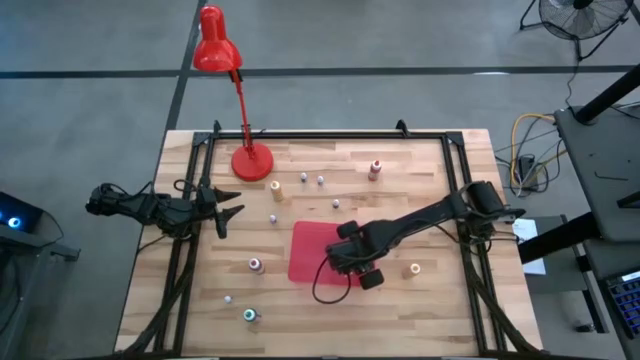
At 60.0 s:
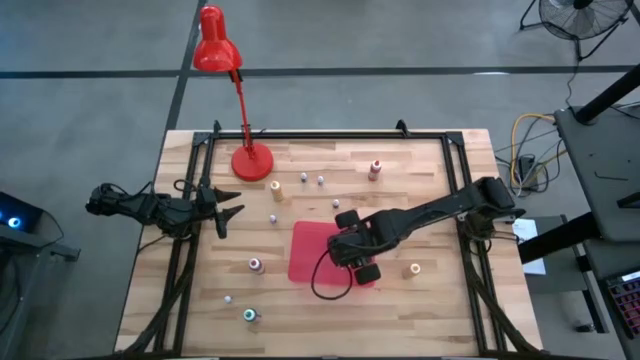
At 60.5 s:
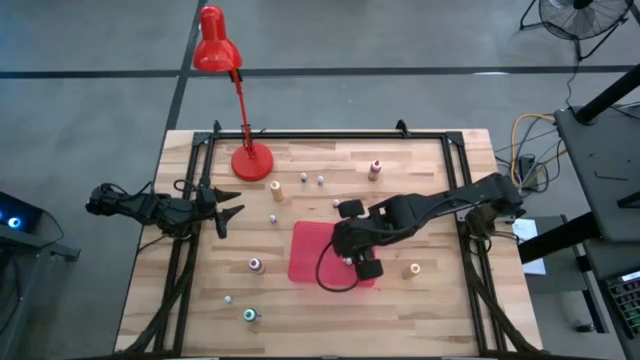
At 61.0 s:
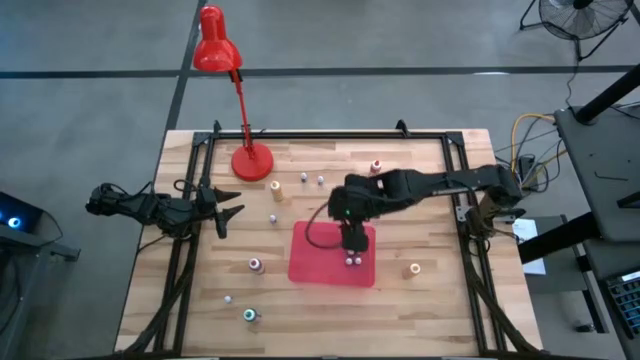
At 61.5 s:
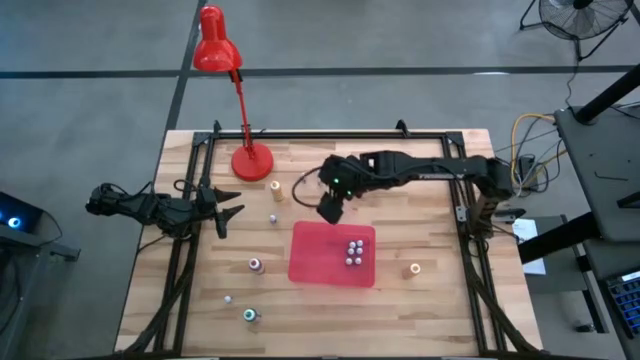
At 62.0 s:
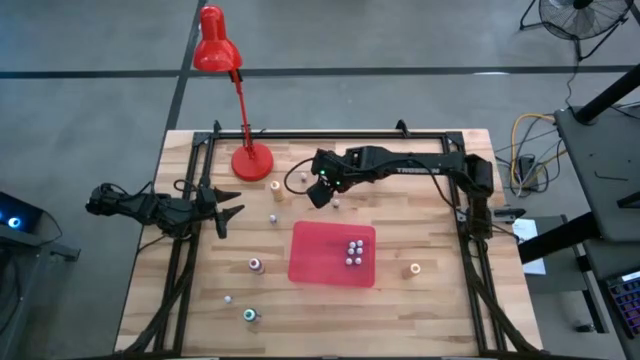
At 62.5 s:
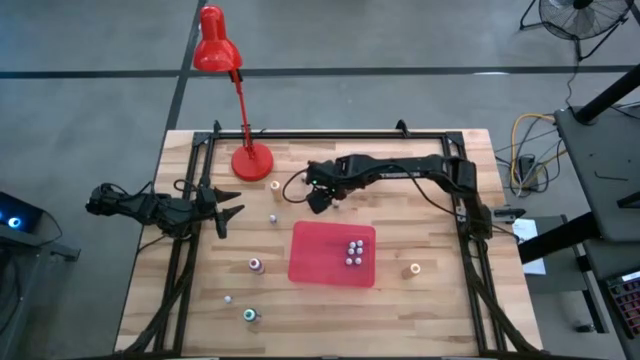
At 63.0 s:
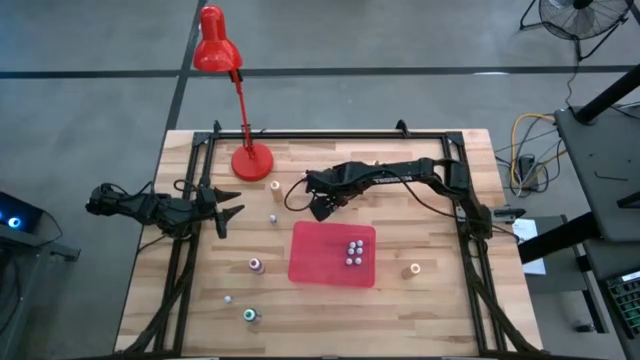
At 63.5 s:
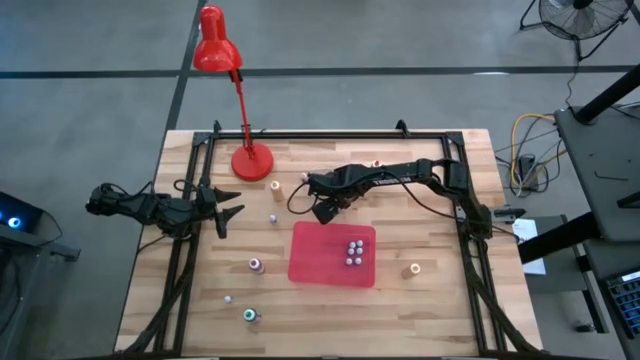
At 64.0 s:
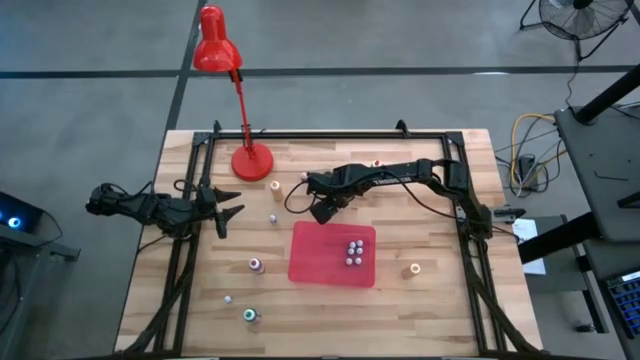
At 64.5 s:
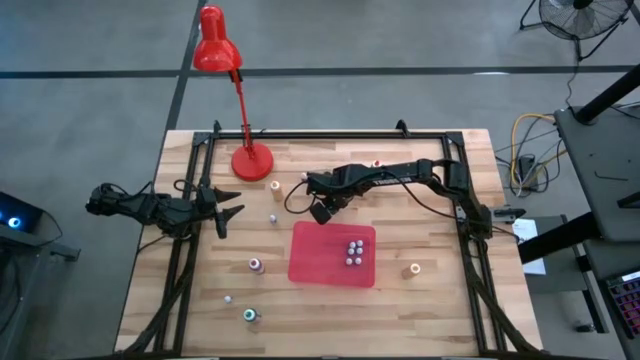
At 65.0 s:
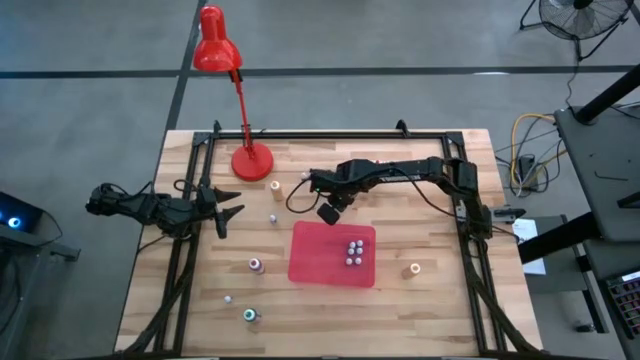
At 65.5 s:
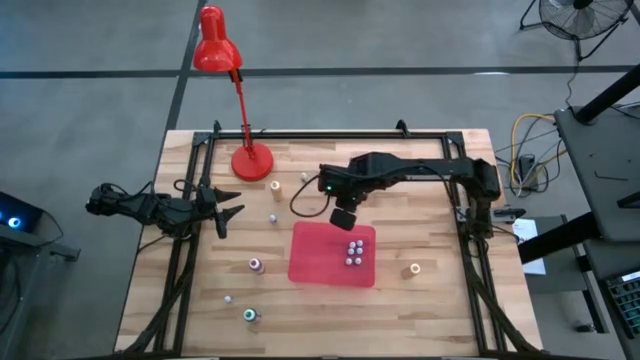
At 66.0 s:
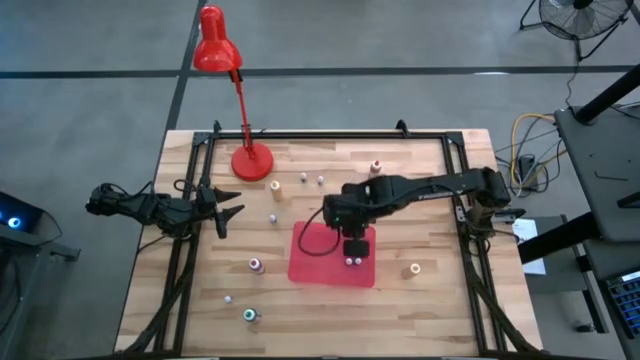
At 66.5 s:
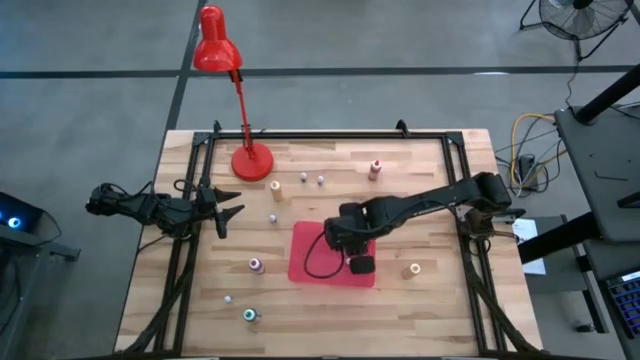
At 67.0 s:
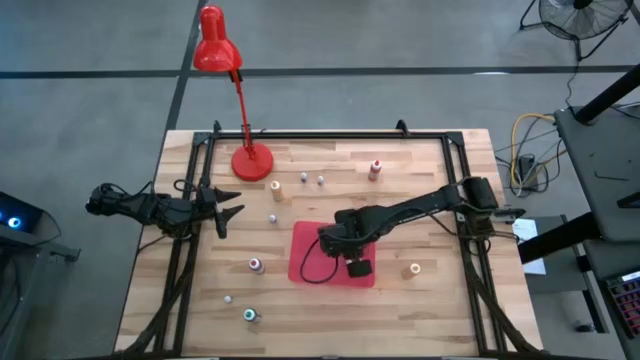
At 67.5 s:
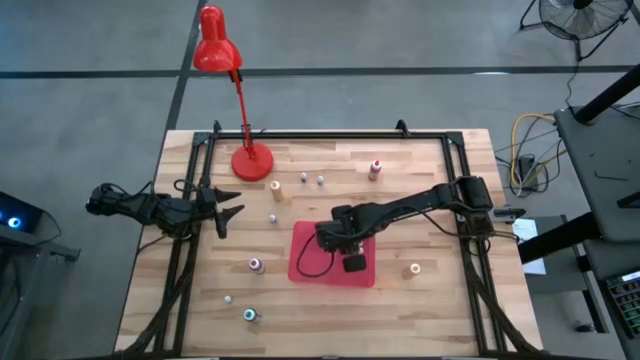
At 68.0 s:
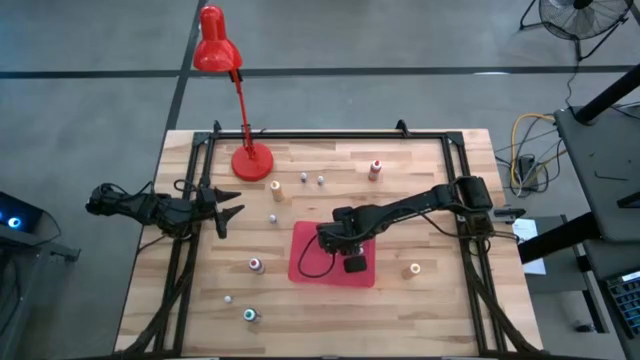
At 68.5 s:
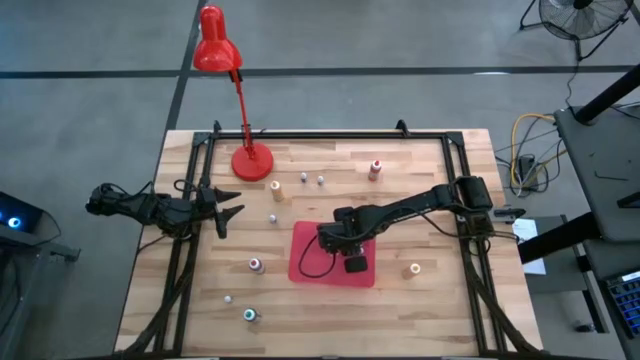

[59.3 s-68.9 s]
Task: Pick & Place food coloring
Put the small black food coloring bottle in the red bin

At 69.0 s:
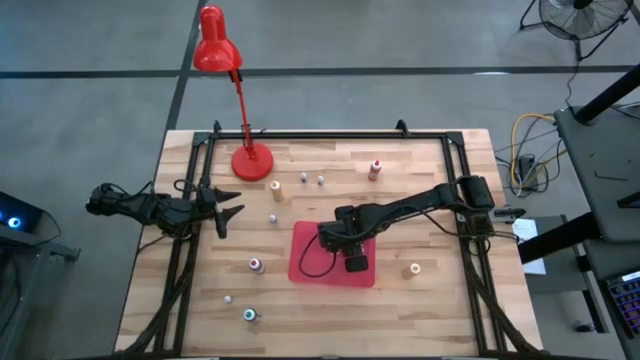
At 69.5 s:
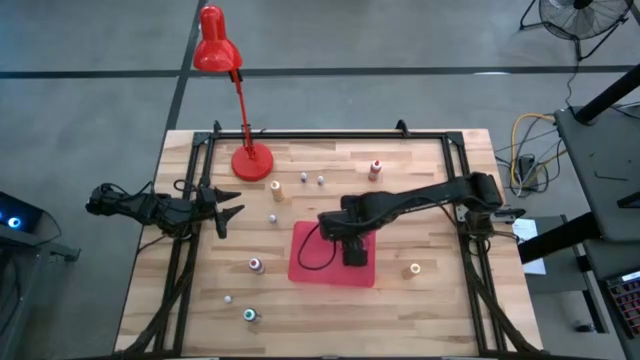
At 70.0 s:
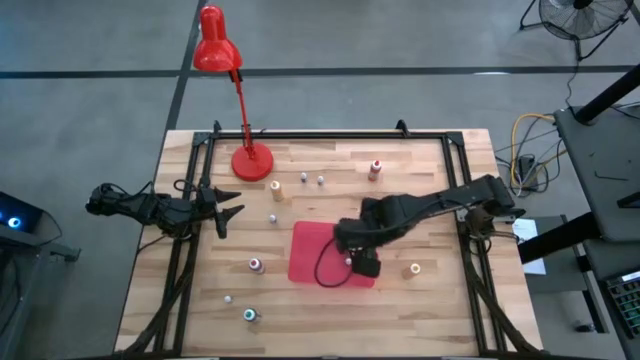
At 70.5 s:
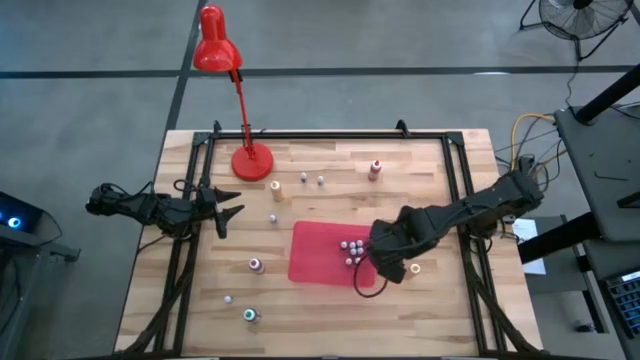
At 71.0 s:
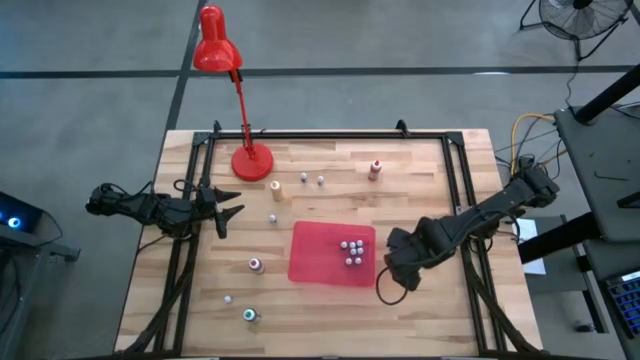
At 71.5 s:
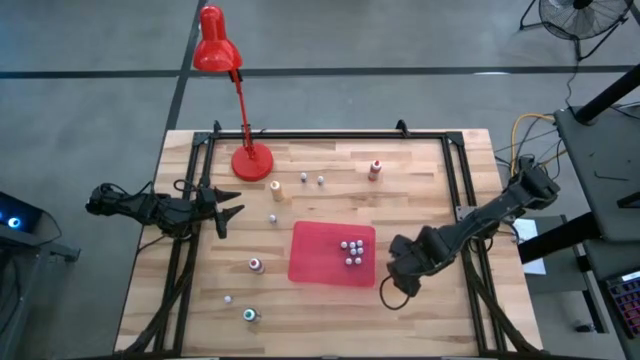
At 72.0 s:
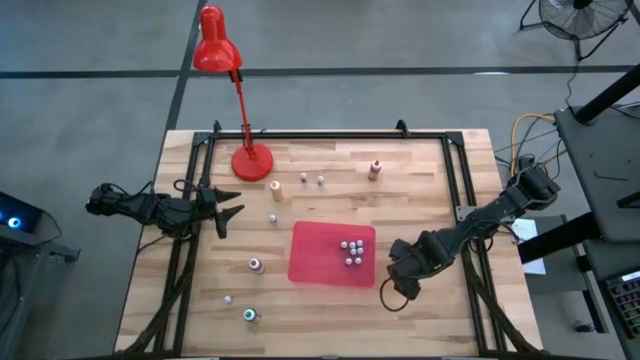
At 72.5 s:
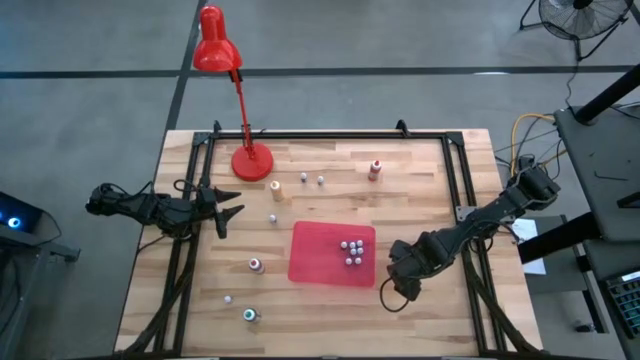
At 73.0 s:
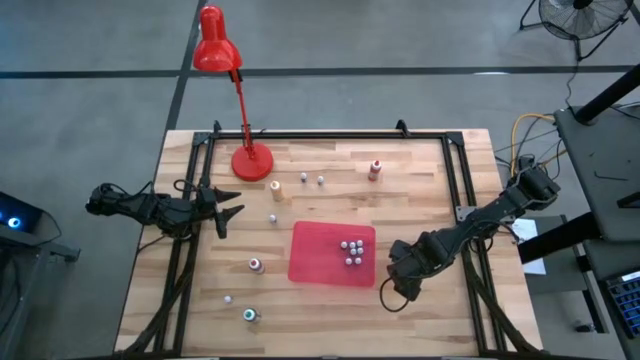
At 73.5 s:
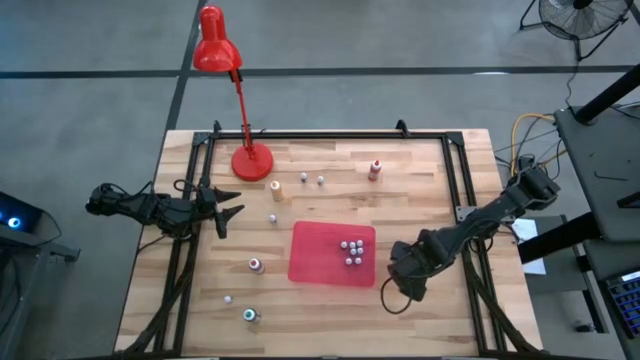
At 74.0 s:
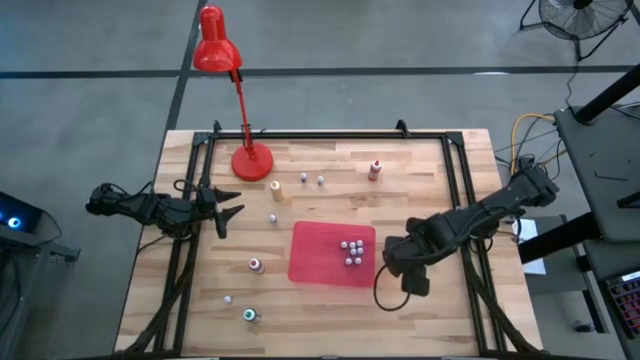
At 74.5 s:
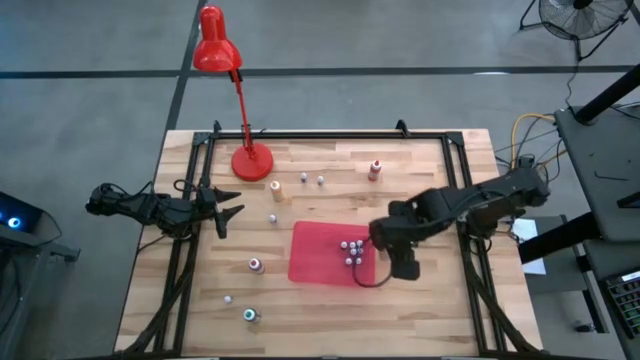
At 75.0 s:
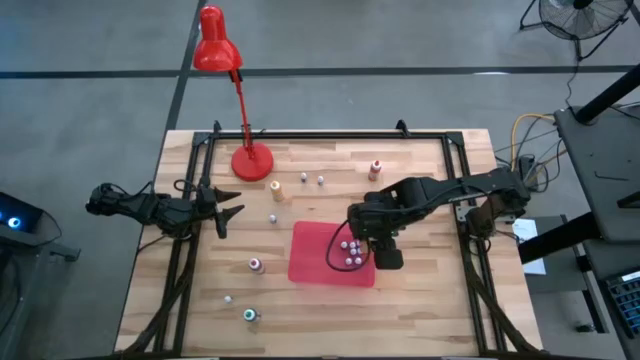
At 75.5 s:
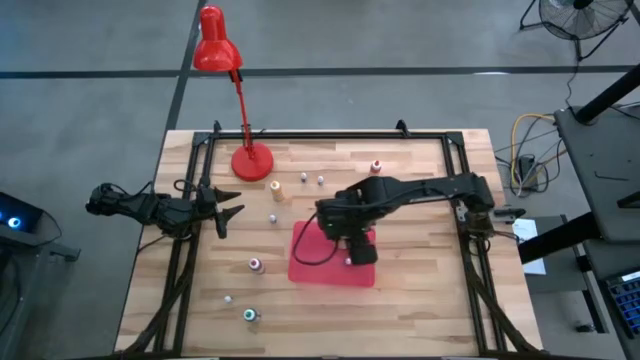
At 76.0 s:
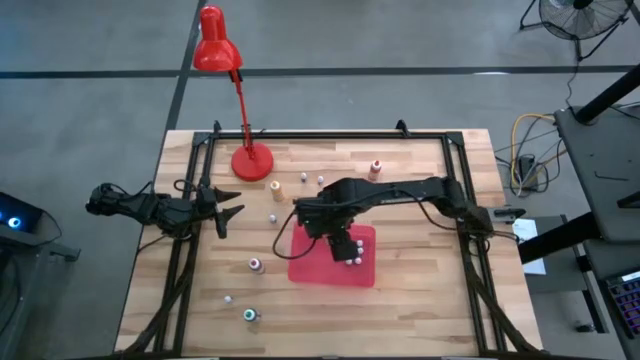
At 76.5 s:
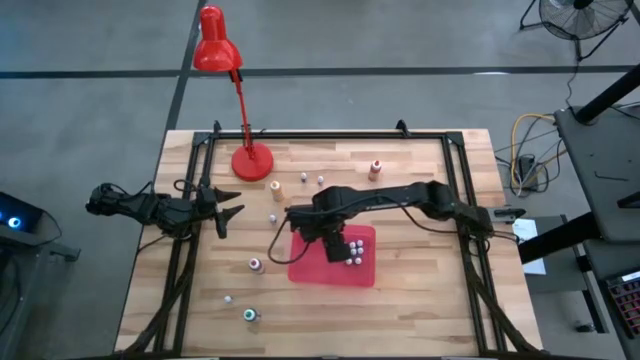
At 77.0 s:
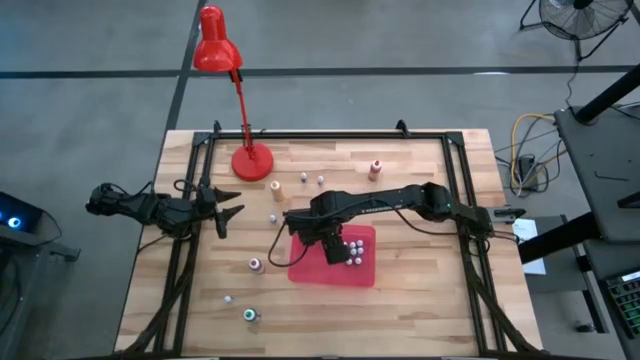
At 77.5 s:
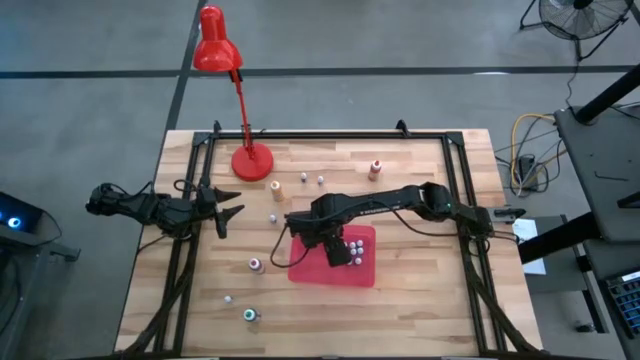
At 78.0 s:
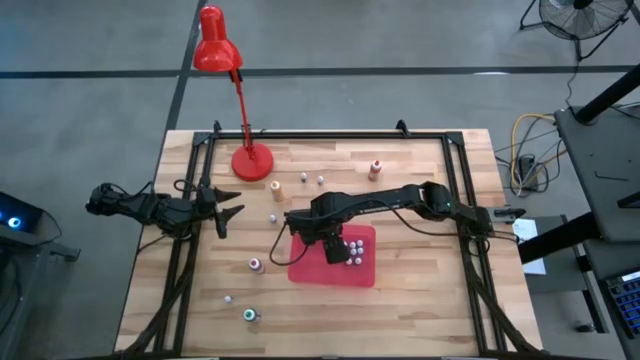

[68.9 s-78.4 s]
Put the large yellow food coloring bottle in the red bin

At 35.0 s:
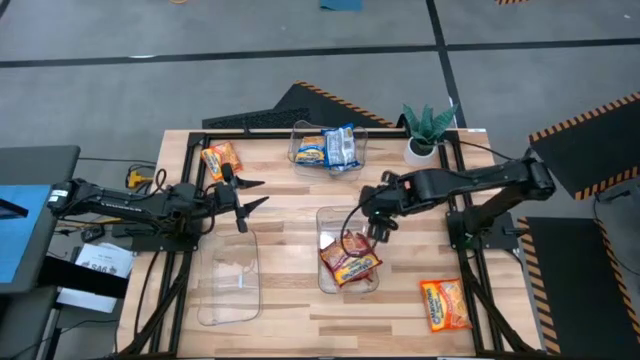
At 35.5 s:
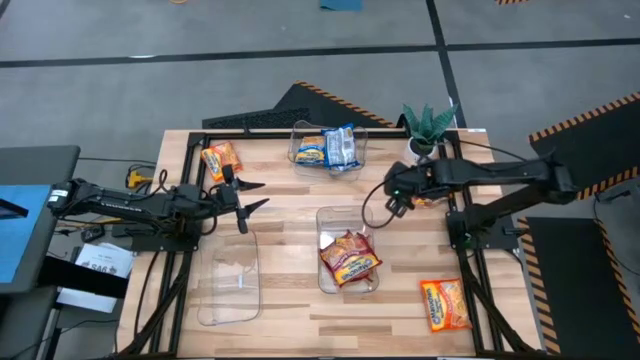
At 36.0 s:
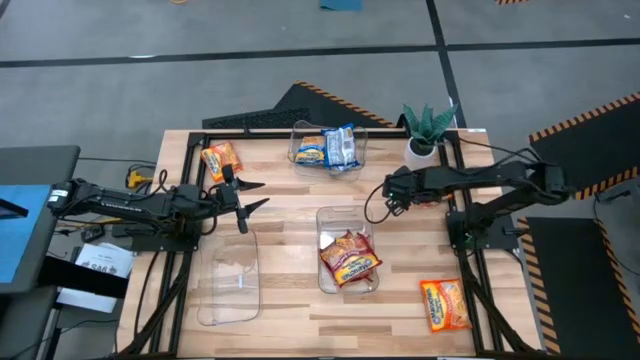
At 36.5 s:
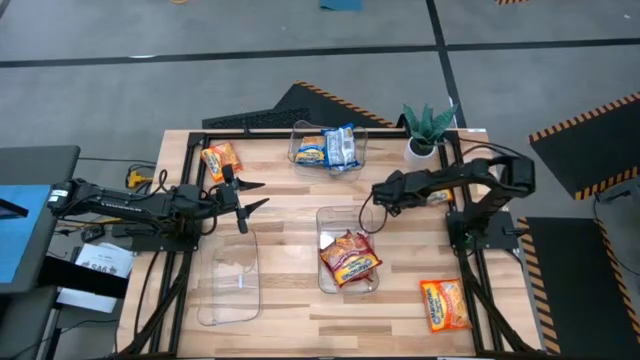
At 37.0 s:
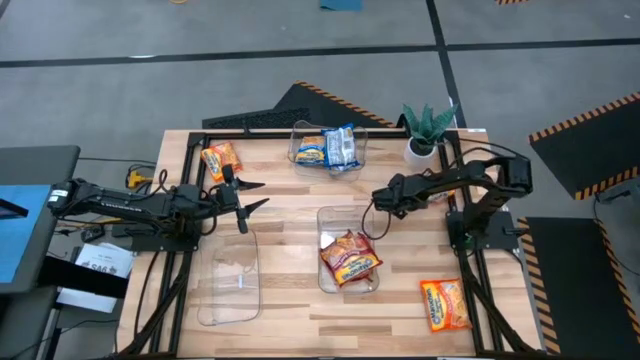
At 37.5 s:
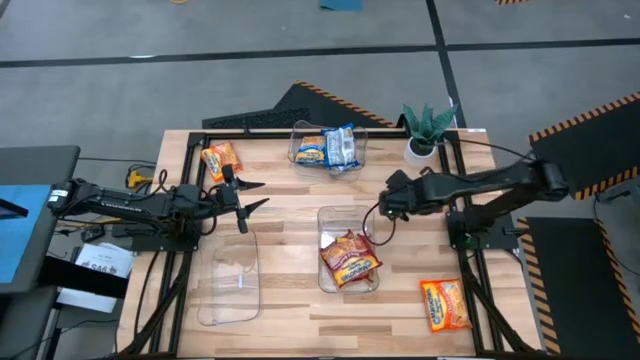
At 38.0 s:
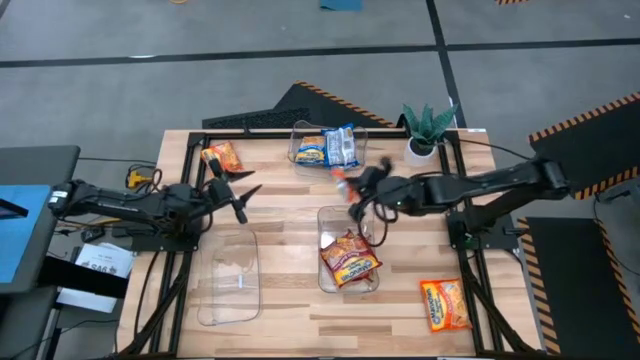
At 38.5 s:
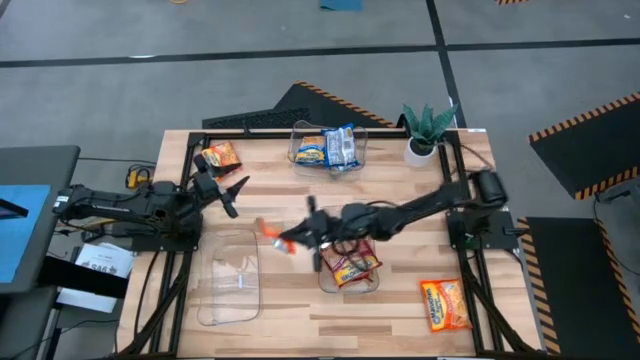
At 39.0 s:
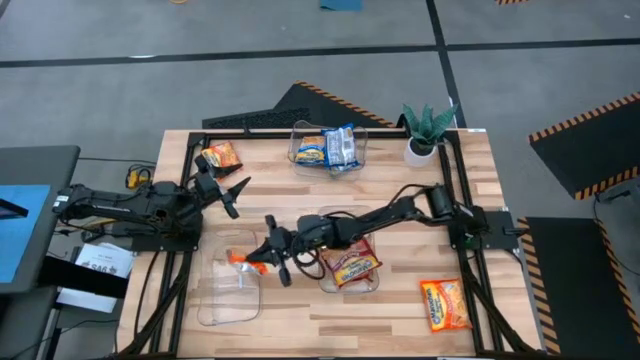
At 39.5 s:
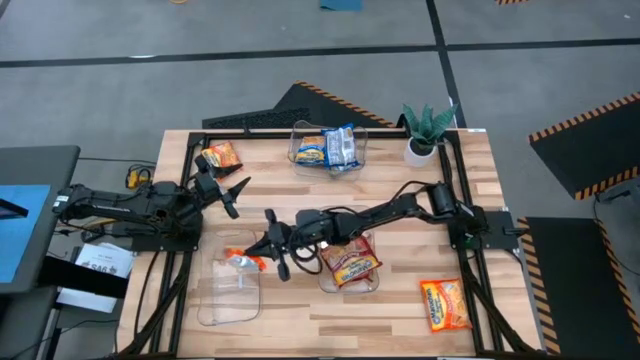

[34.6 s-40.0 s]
Task: Sort Maruchan noodles
Put the top right orange noodle pack into the left transparent bin
